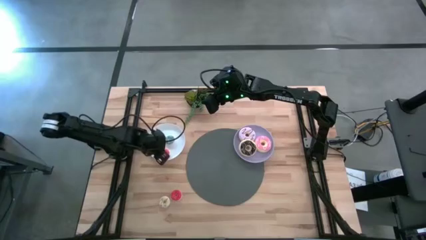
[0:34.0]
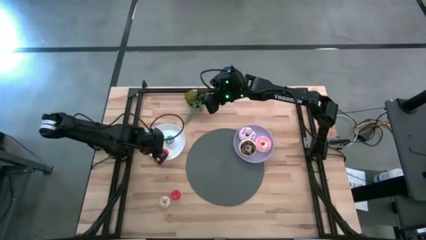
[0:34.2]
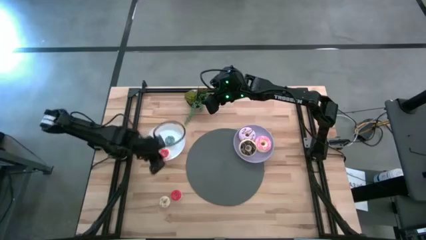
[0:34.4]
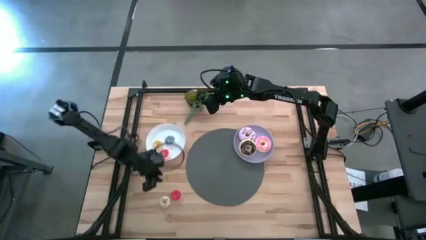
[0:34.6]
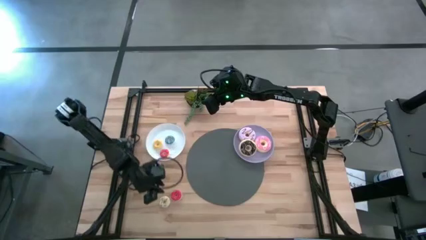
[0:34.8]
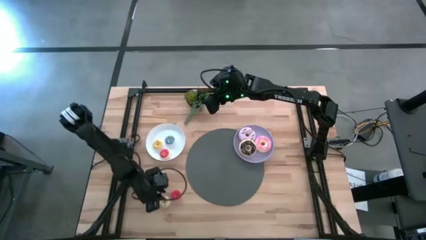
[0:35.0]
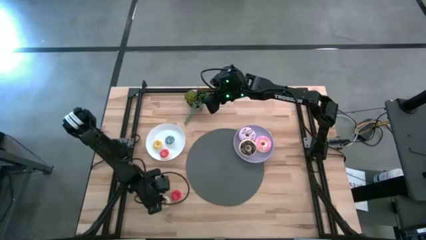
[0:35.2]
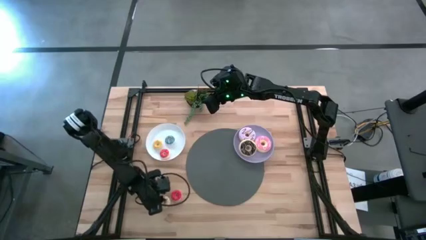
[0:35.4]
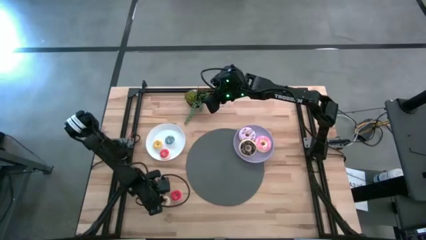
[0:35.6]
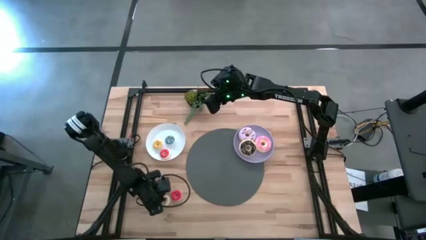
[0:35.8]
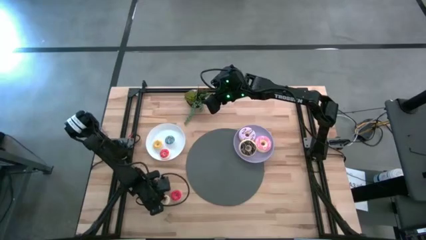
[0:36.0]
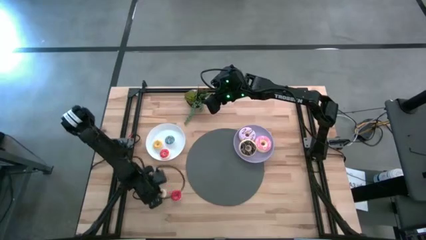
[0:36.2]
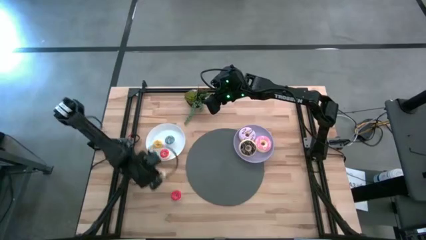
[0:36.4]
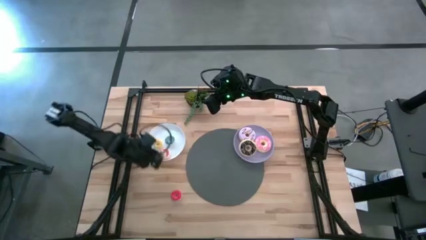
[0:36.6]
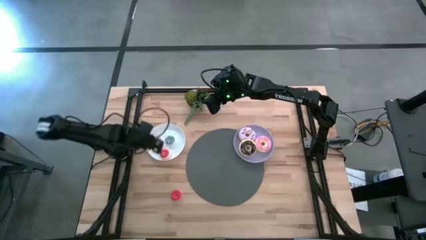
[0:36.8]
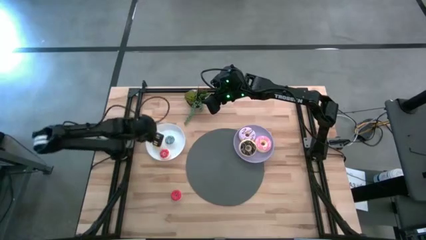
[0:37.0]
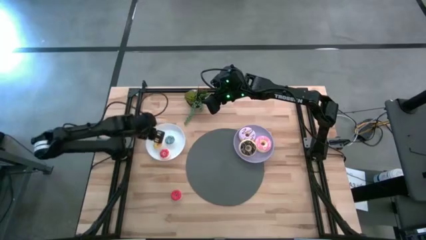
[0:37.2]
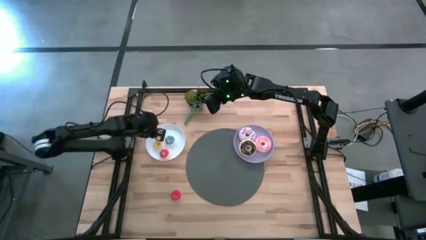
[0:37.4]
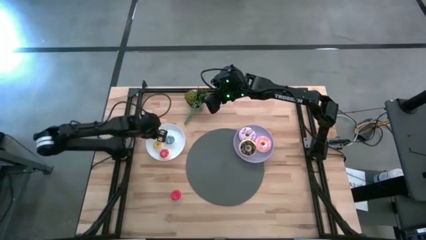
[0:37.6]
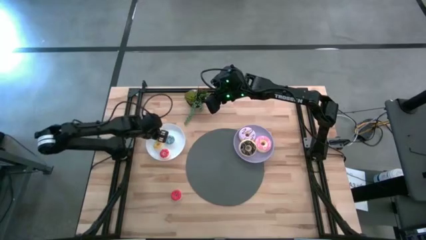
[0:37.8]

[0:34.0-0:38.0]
Task: Pick & Place donuts
Put the small white donut on the white plate

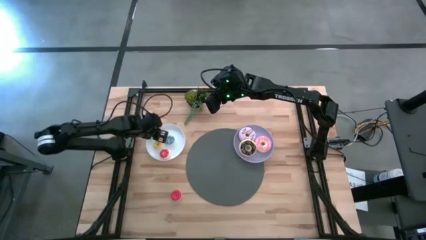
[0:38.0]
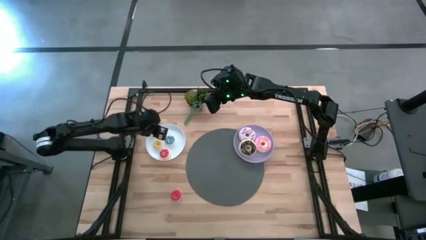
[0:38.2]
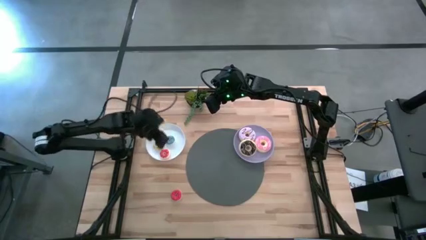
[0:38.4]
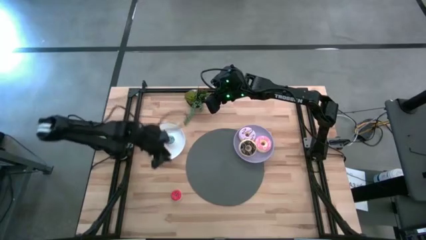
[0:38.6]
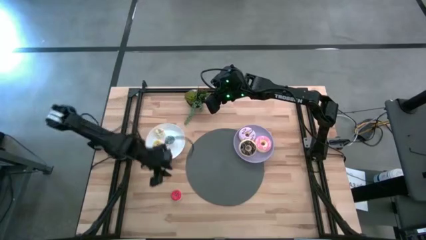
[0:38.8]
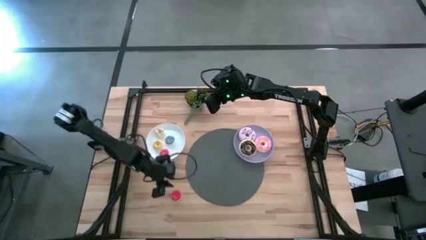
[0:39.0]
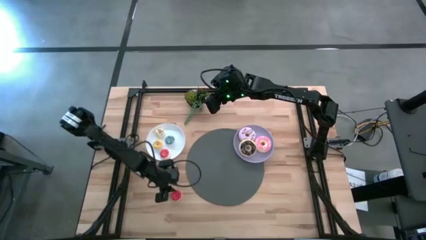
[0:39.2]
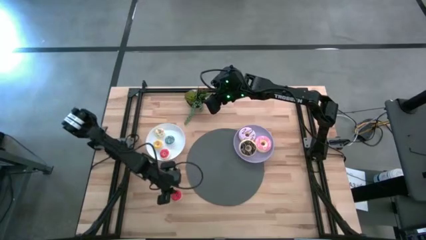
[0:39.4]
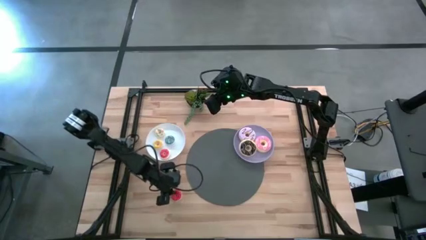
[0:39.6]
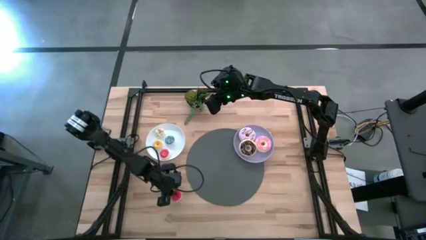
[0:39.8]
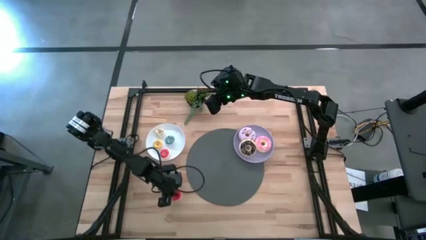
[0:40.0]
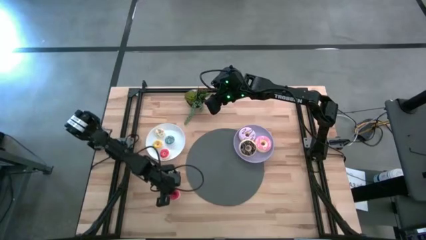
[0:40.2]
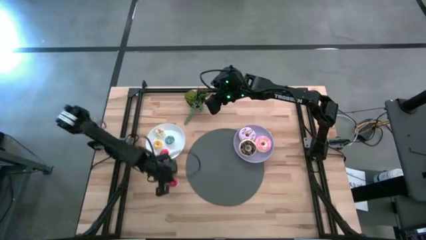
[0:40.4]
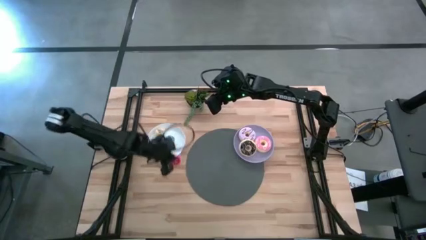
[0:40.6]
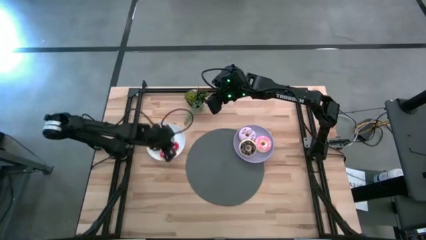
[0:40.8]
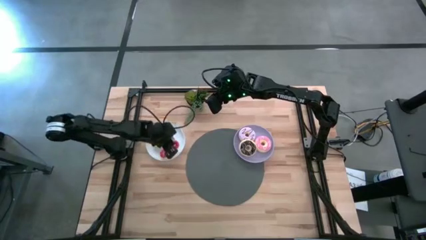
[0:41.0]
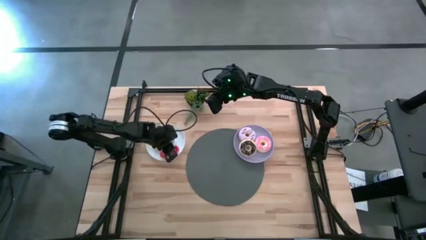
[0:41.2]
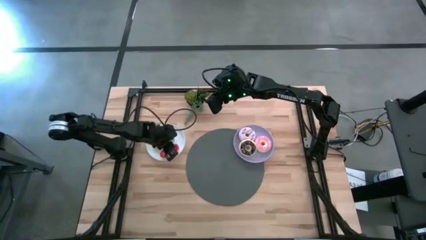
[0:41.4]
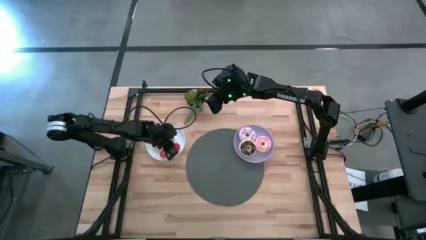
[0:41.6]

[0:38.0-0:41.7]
Put the small red donut on the white plate

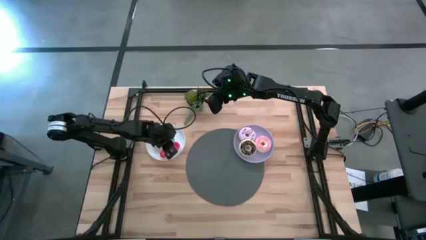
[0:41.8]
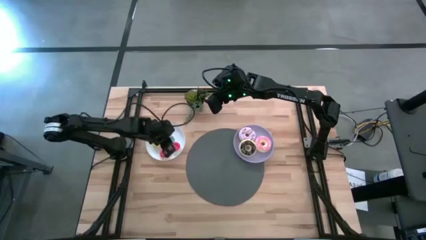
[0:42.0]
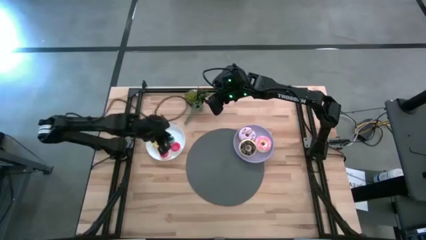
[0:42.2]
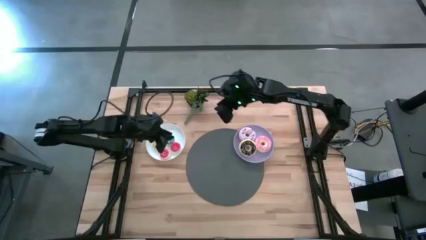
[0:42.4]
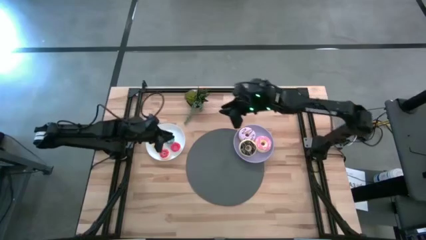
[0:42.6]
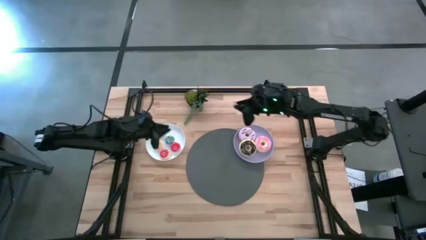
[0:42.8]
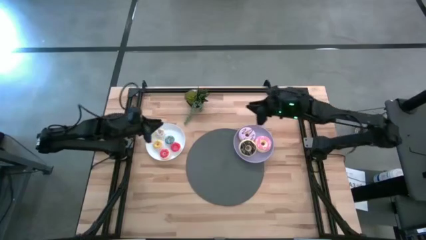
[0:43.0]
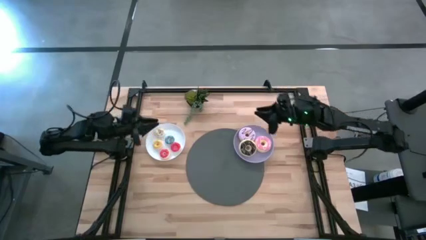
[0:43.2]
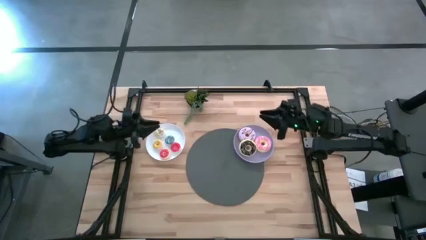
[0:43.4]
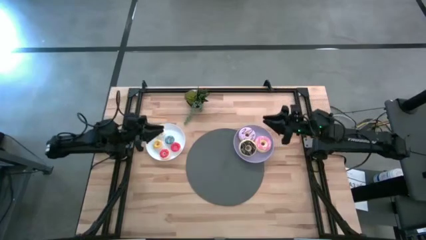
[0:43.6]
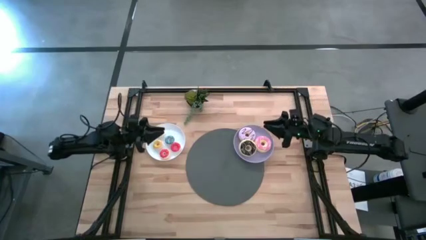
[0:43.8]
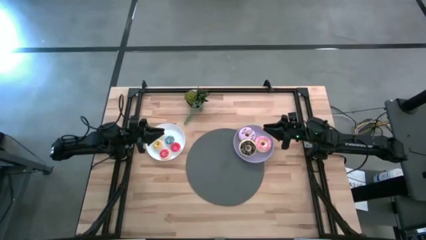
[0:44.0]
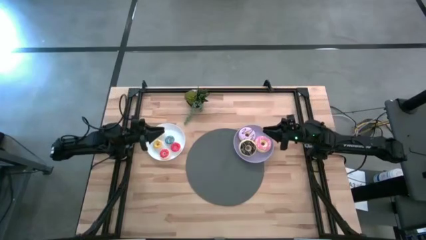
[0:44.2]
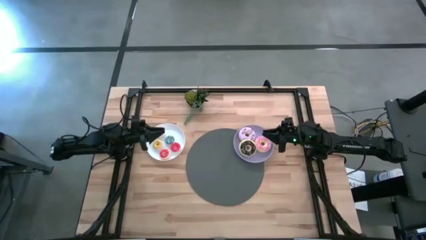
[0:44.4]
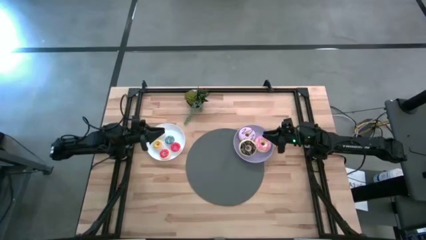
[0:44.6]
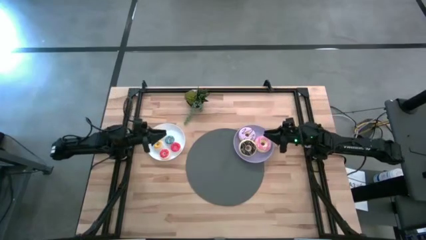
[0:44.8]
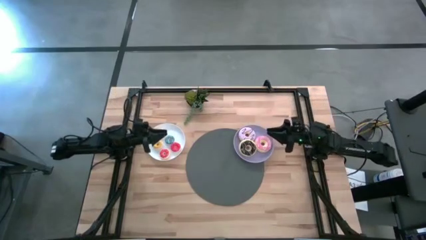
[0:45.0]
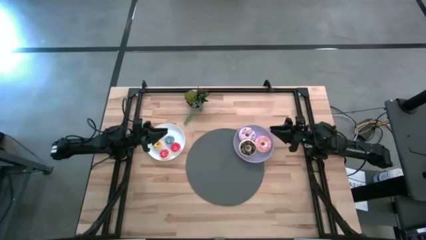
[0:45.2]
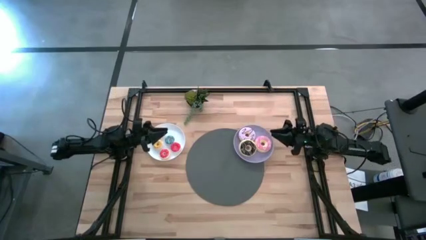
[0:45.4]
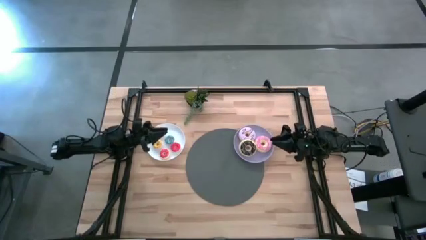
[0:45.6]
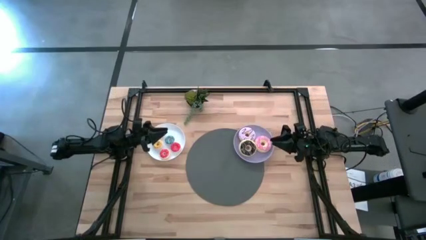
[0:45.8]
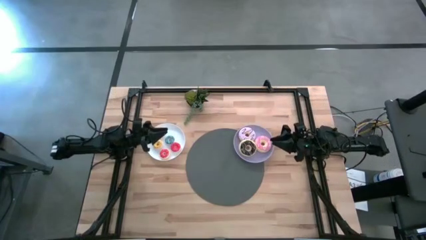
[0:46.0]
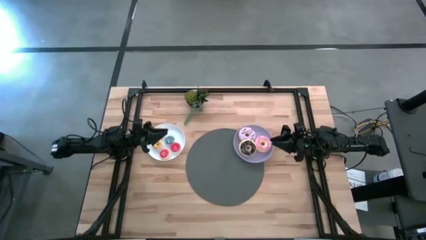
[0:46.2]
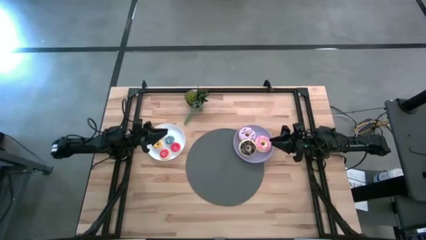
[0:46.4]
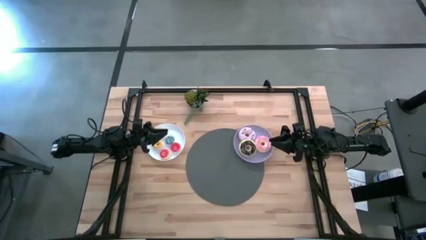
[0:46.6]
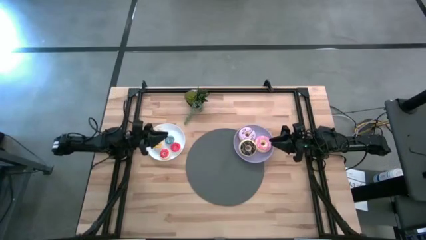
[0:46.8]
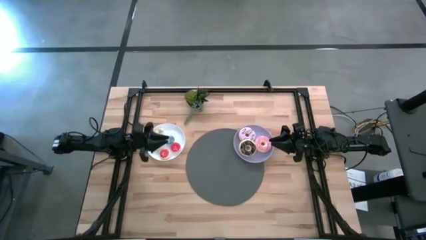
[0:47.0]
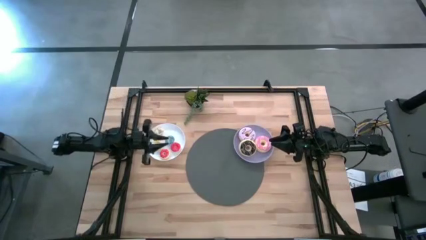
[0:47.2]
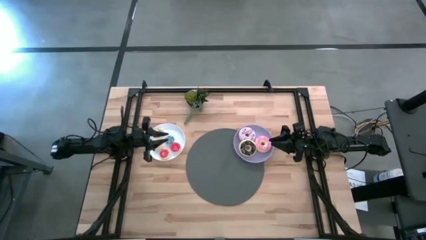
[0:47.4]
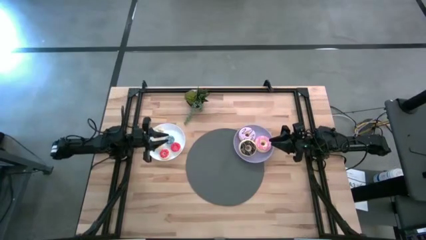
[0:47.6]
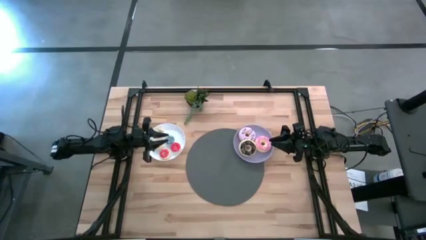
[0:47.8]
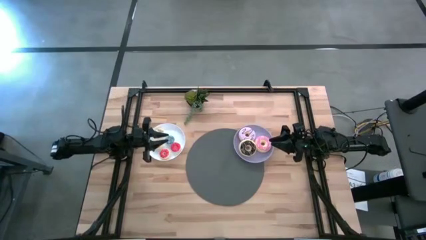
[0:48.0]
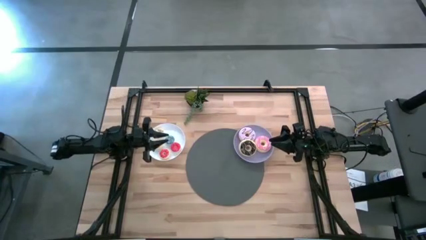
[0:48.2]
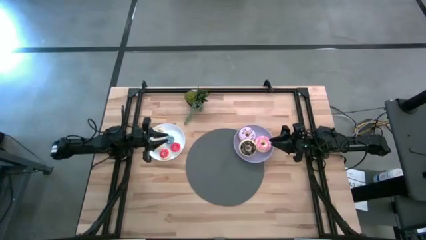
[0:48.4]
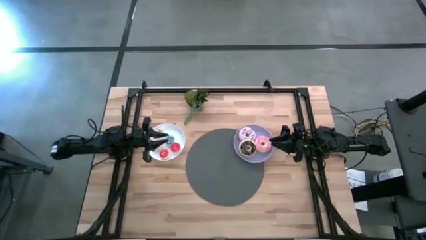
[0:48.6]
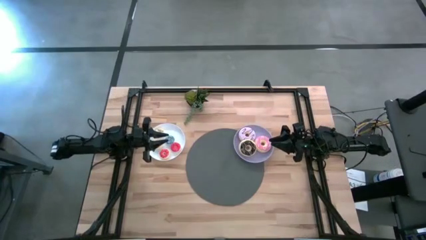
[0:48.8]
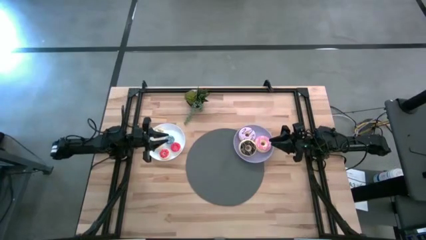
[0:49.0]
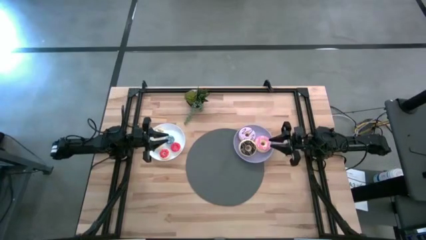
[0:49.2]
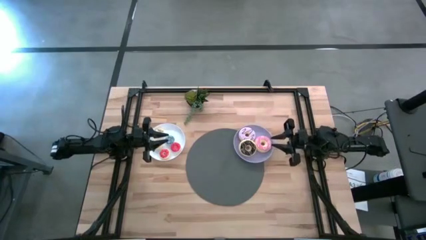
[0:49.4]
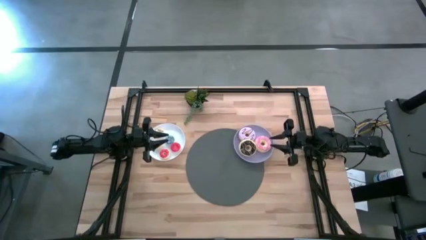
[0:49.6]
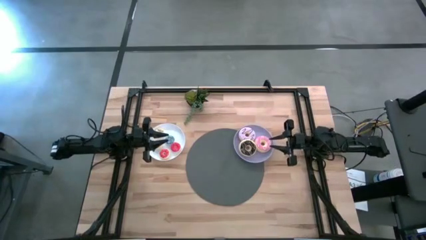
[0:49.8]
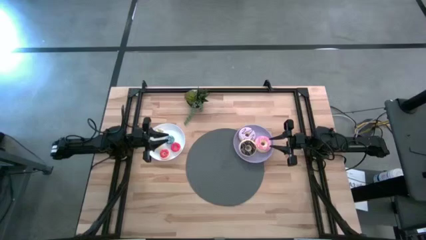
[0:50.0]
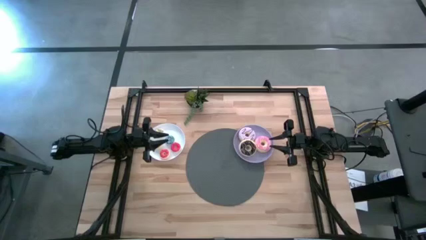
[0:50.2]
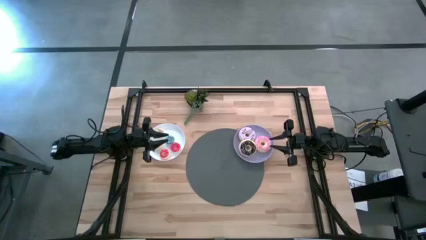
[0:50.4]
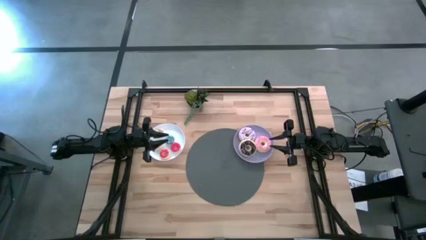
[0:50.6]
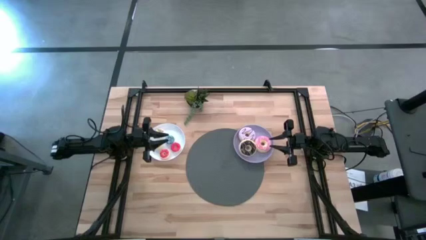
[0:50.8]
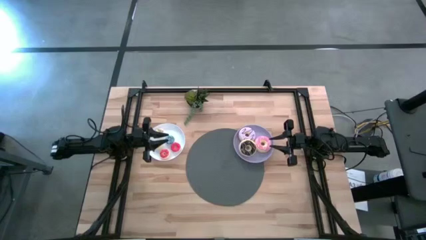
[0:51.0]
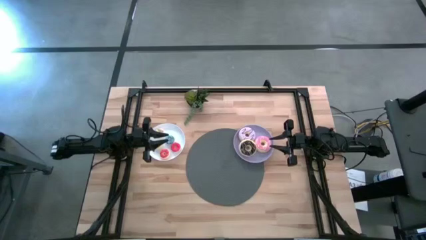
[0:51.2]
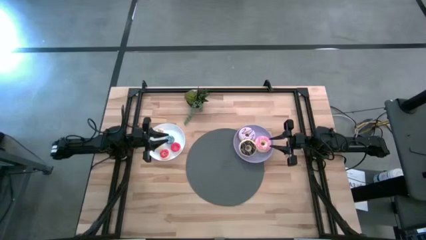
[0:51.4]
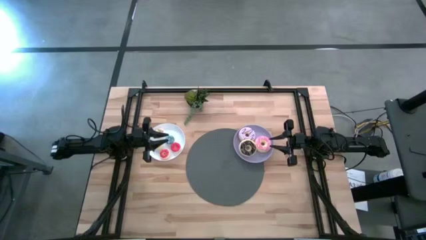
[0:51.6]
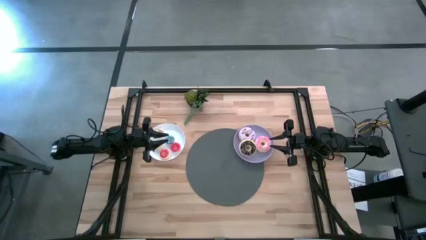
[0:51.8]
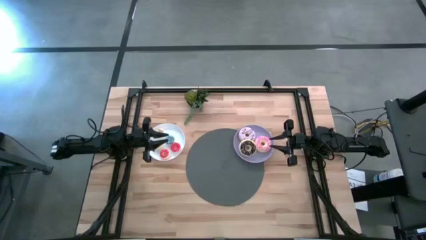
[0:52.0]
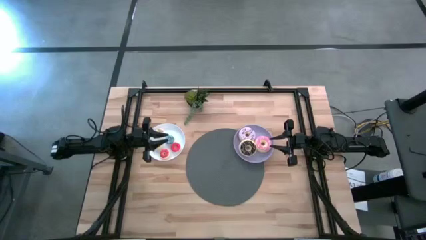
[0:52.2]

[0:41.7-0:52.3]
Return to Home Position
